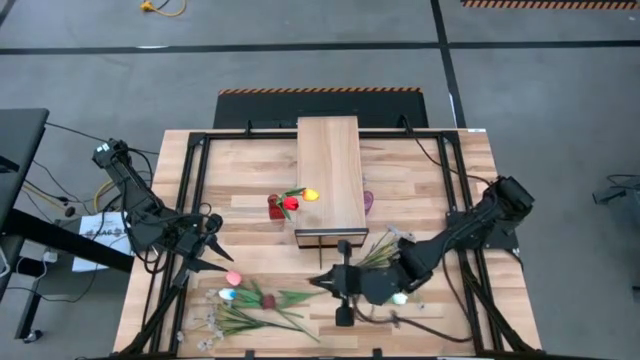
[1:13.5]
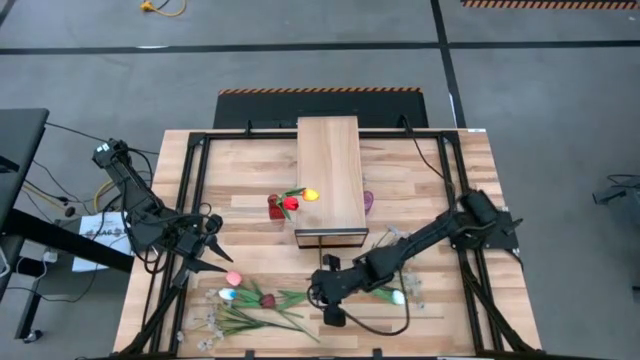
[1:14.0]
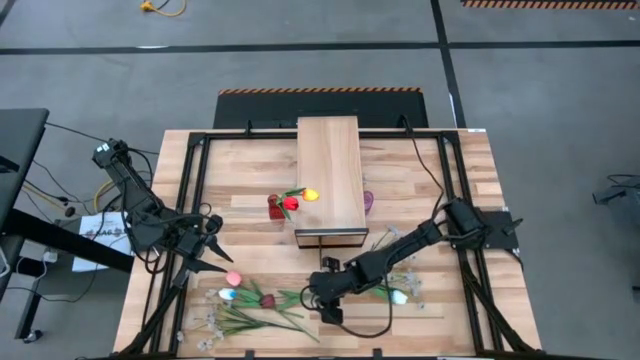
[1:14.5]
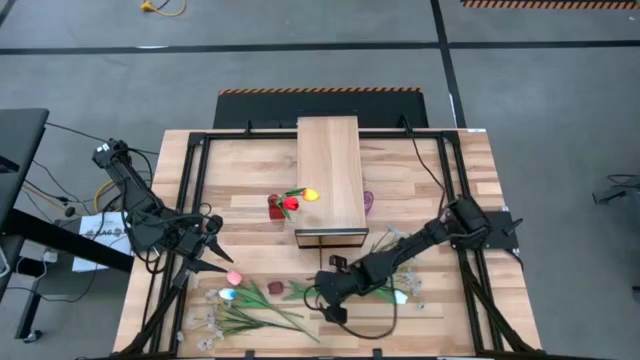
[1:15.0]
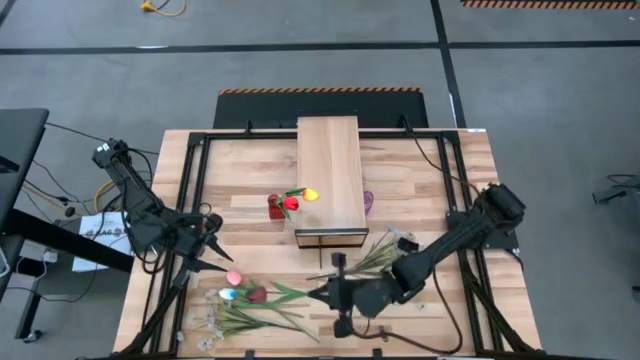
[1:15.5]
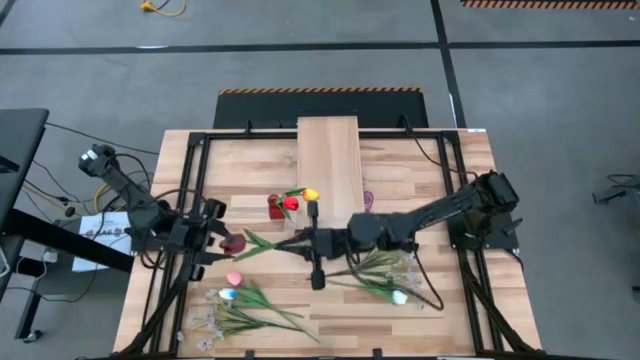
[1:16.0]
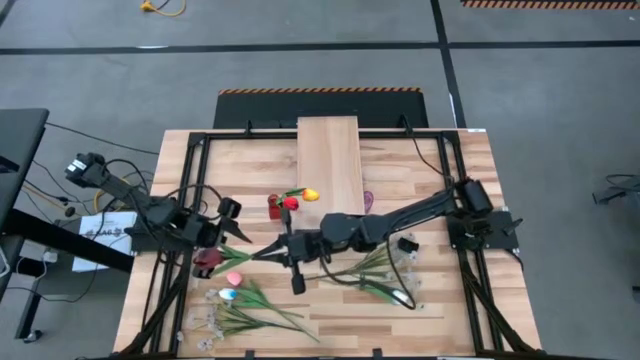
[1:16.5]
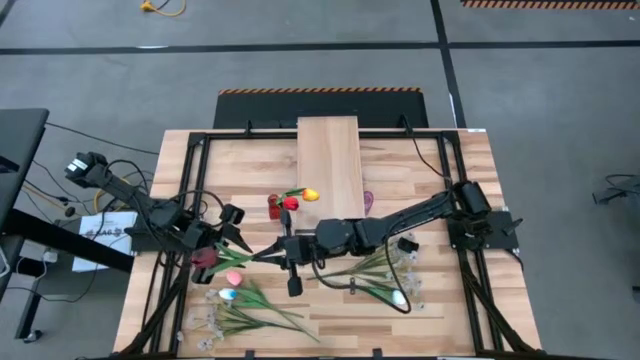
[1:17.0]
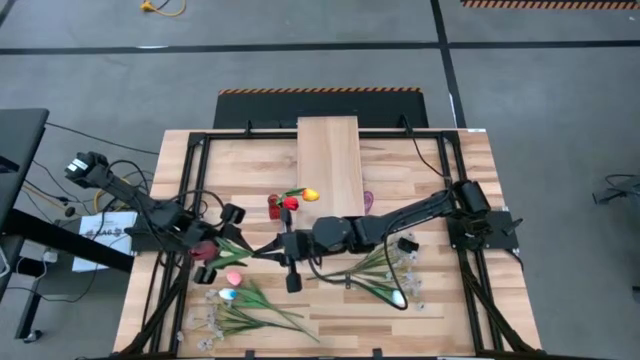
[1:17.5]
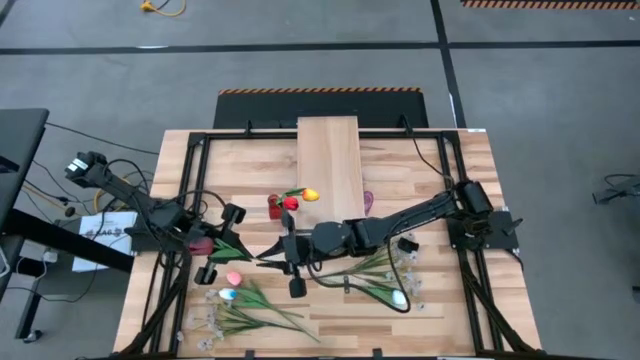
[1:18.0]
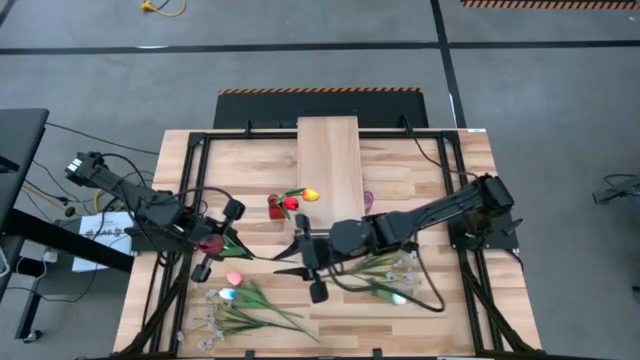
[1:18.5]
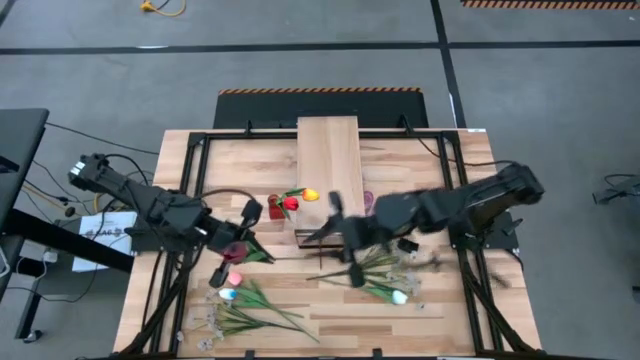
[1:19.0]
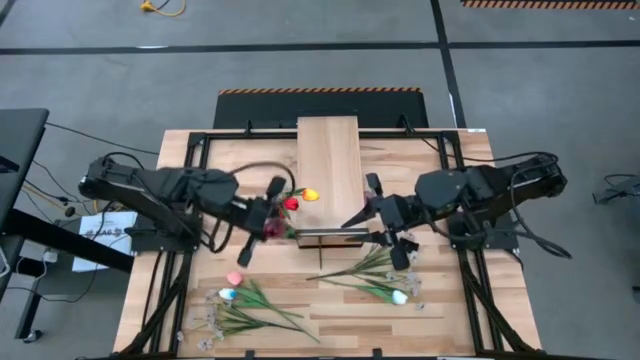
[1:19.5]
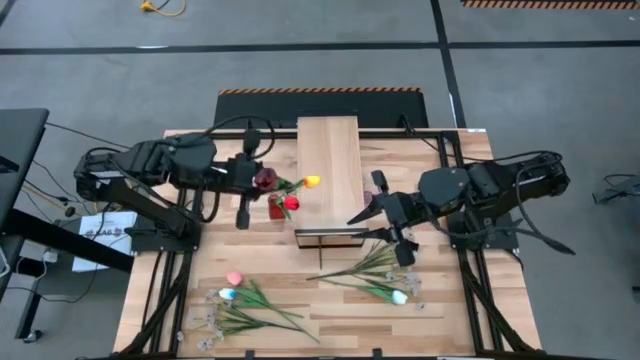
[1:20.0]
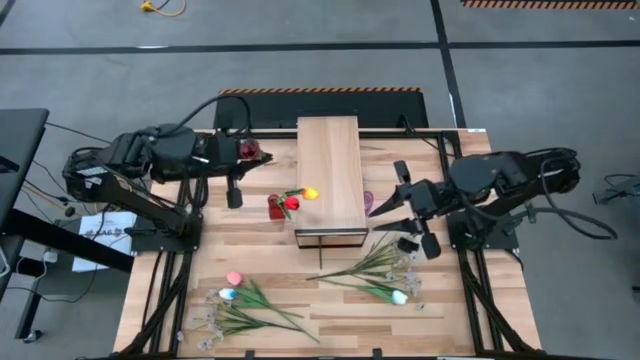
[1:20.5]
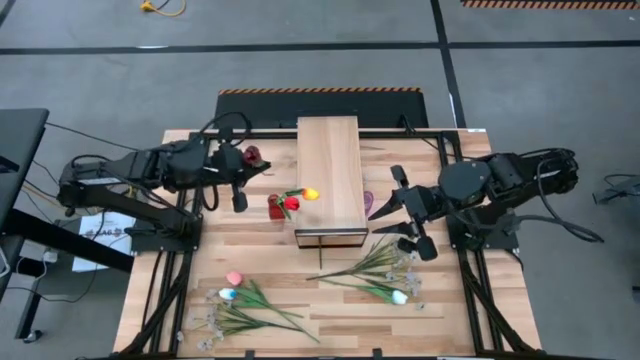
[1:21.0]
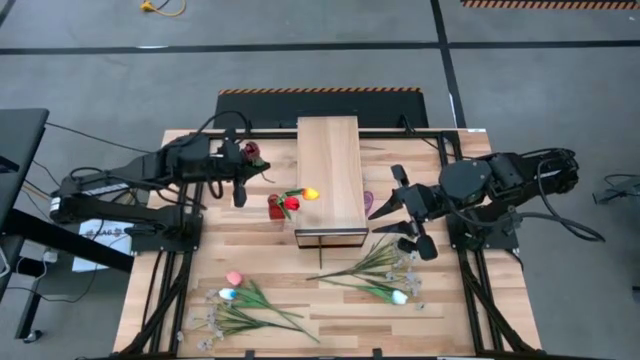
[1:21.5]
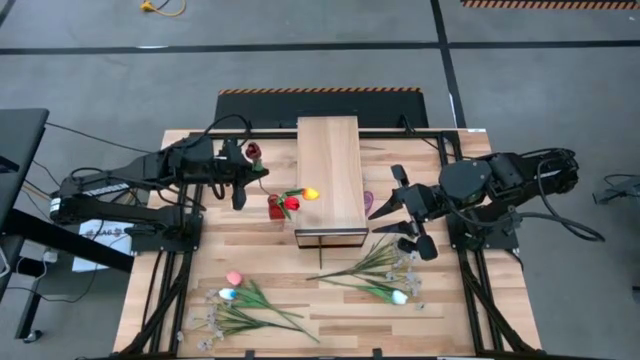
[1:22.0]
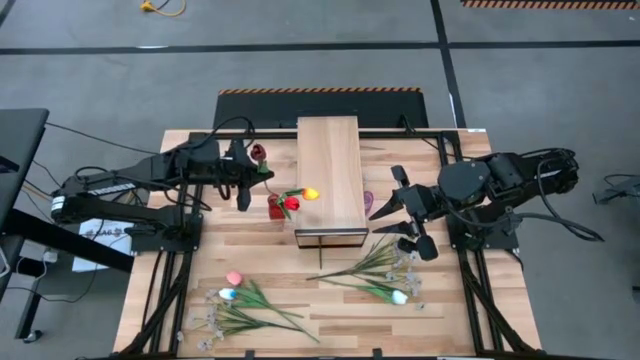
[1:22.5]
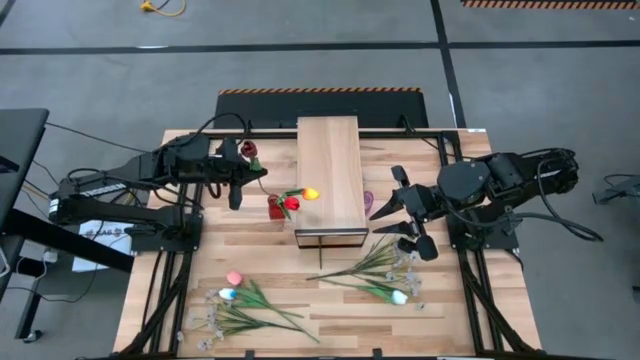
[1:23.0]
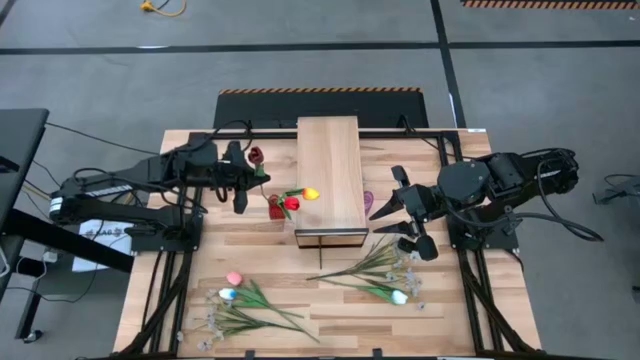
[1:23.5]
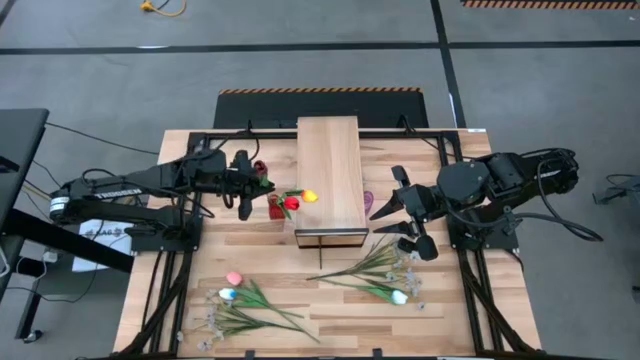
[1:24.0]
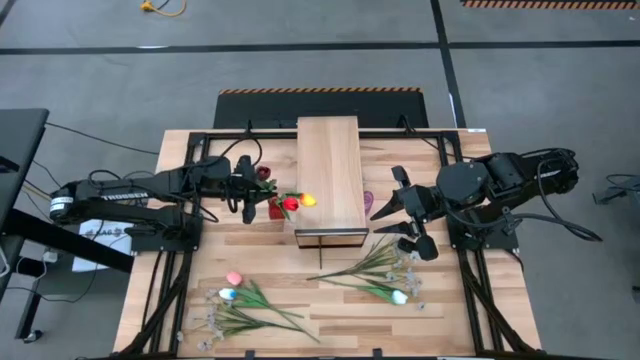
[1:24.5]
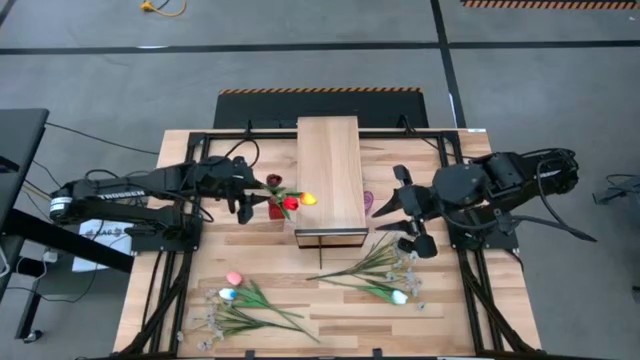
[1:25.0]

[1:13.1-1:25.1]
Task: Pick and place flowers into a vace then onto a shelf
Put the dark red tulip into the red flower vase

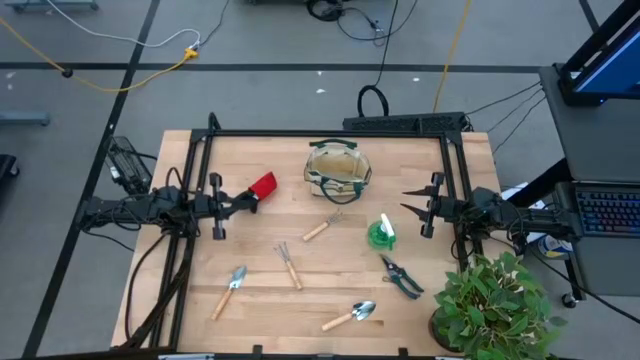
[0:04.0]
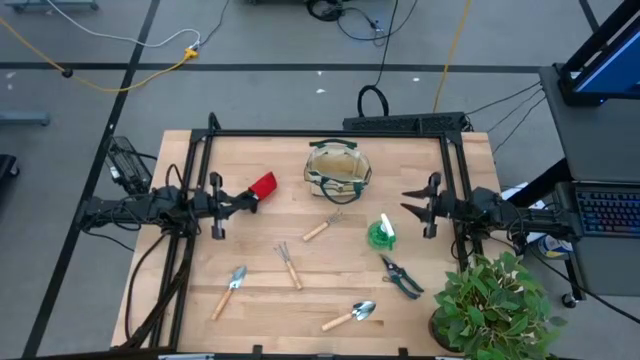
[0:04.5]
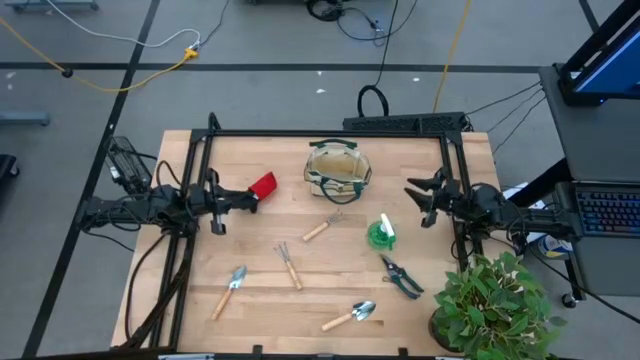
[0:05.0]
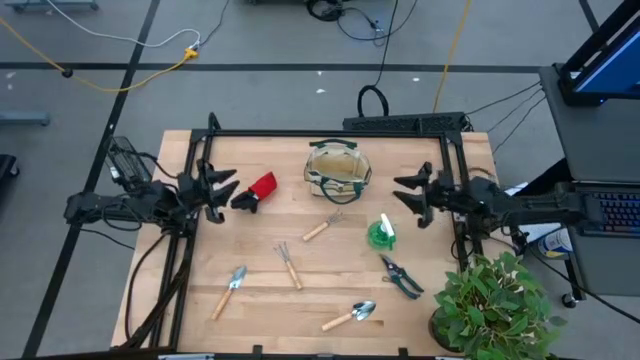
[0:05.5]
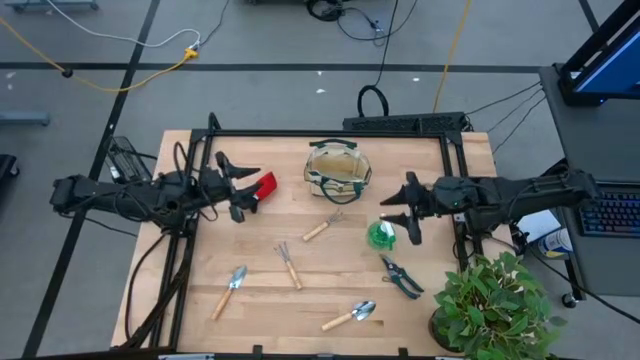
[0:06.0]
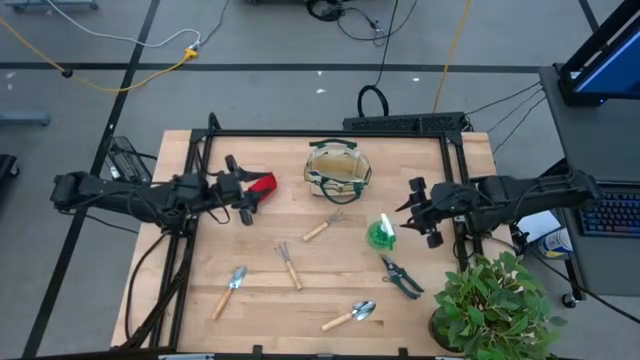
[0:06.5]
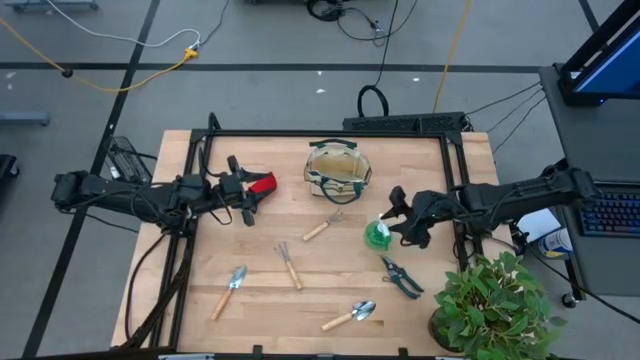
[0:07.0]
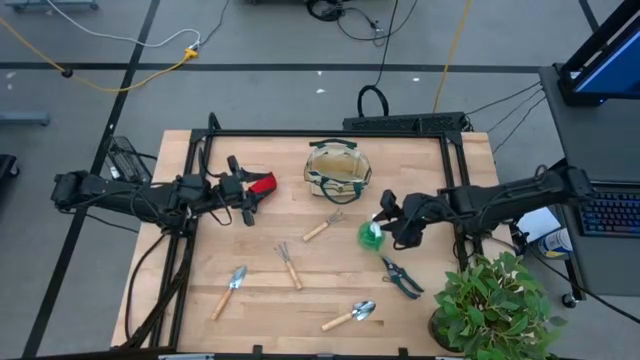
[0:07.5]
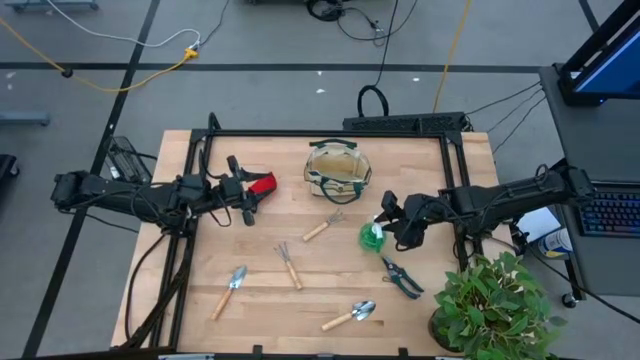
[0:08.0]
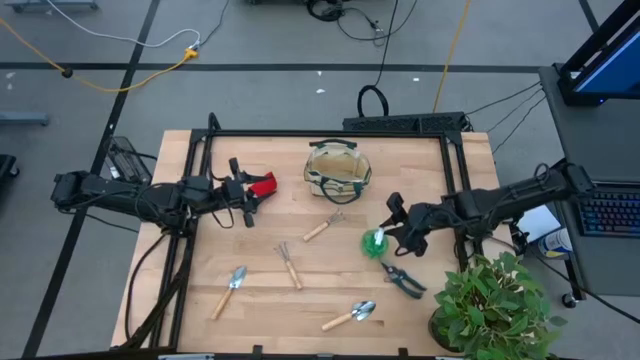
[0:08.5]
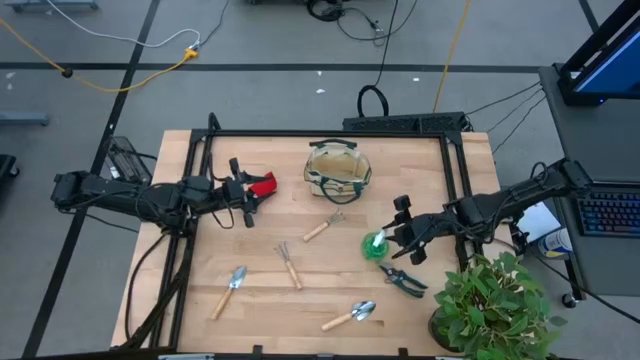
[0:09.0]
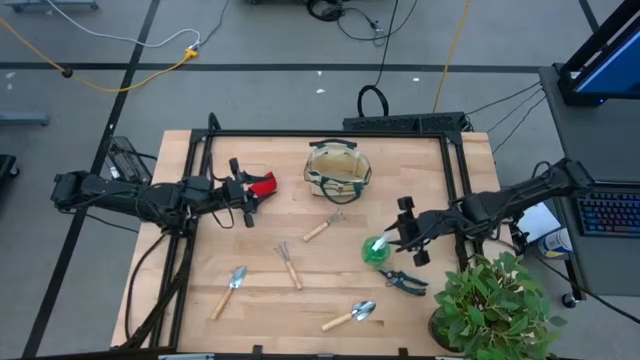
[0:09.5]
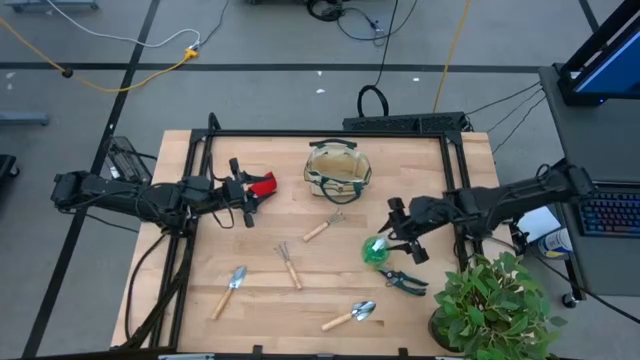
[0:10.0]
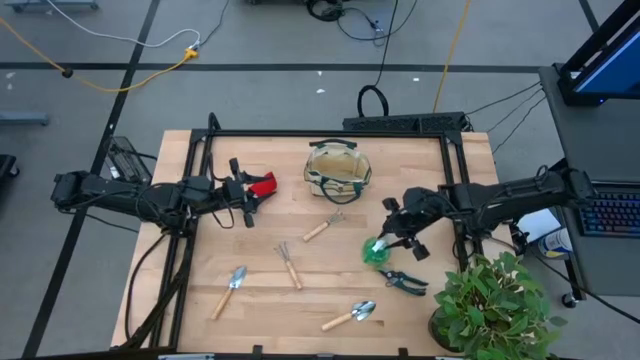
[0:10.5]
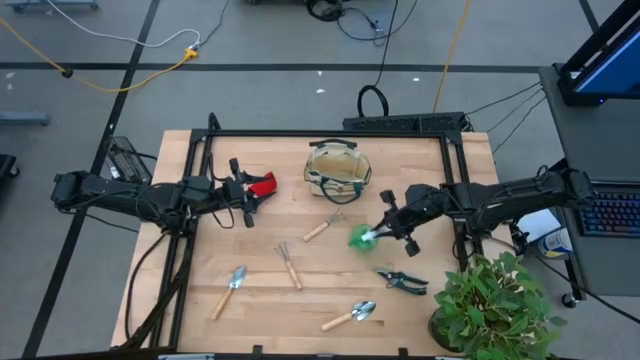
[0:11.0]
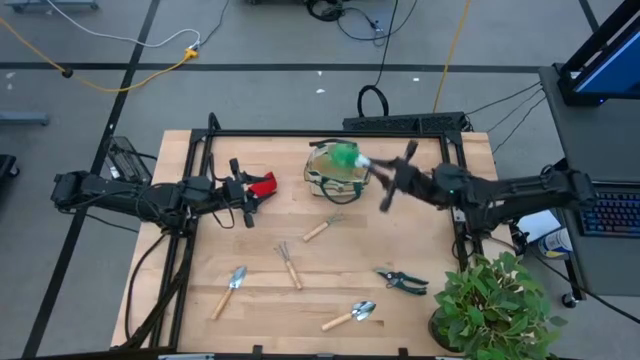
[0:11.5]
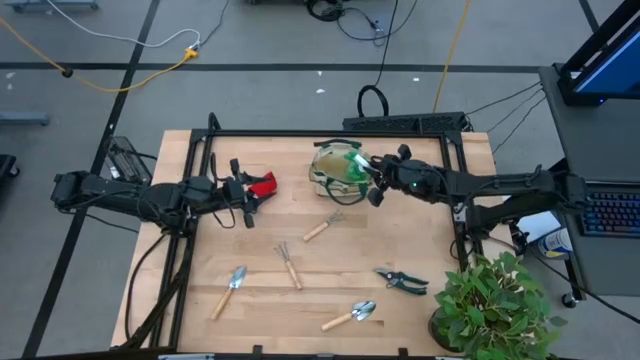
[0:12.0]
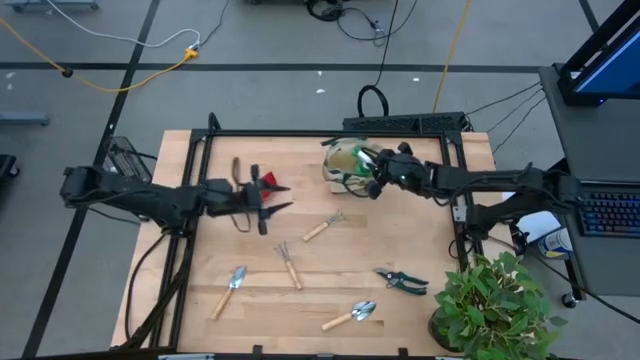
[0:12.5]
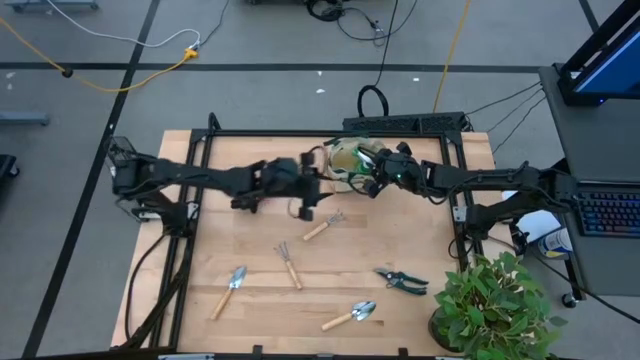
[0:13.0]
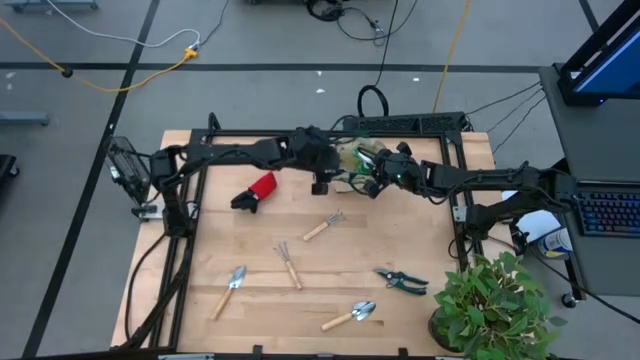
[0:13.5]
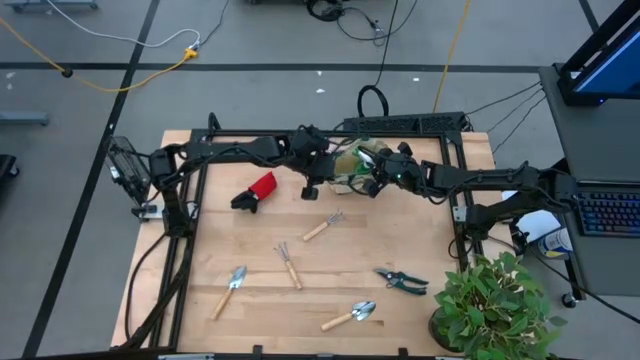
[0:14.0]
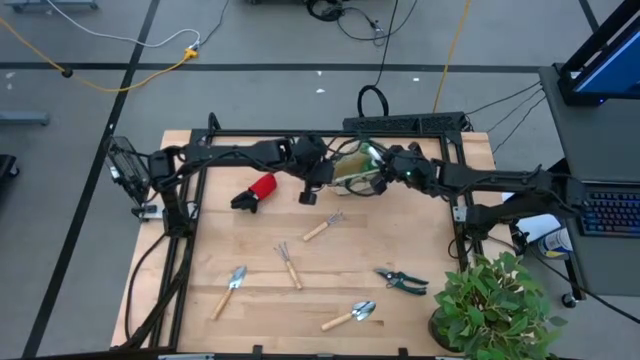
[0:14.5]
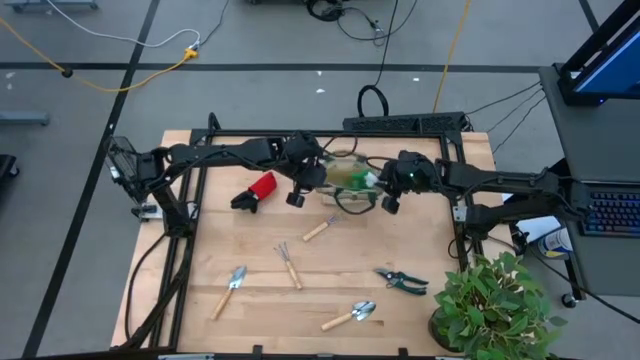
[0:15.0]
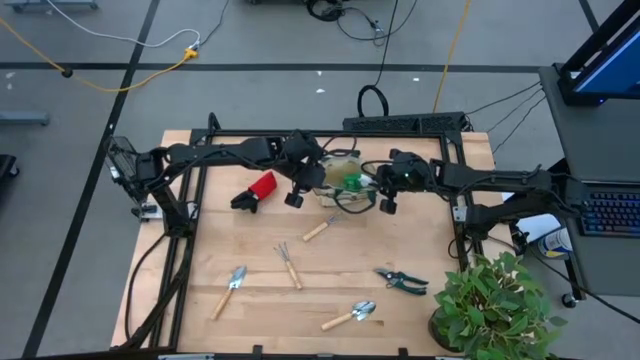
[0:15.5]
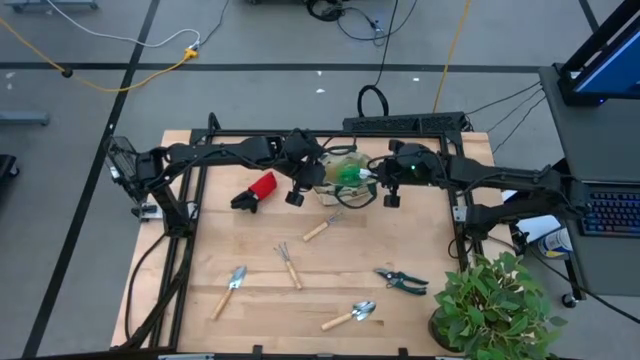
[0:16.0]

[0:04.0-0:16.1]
Task: Pick & Place Garden tools in Gardening bag
Put the green spray bottle into the gardening bag
